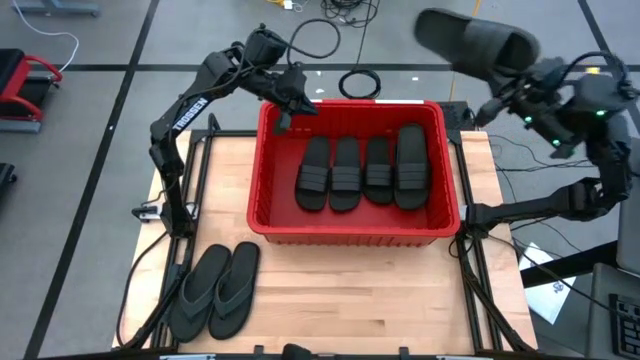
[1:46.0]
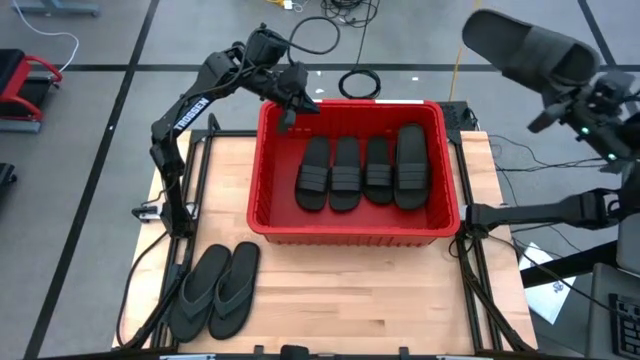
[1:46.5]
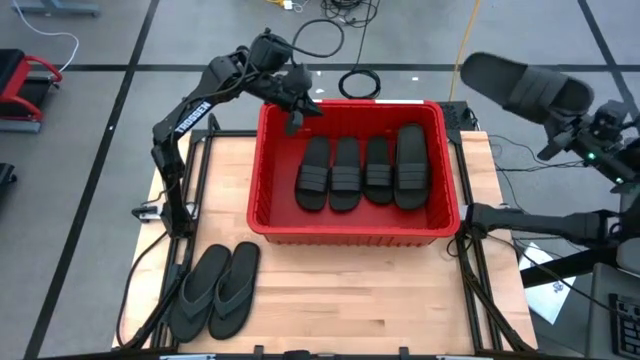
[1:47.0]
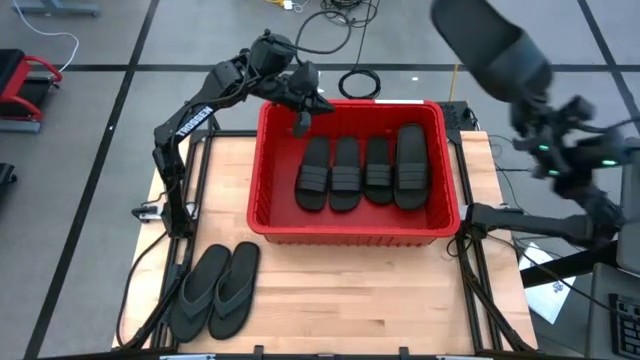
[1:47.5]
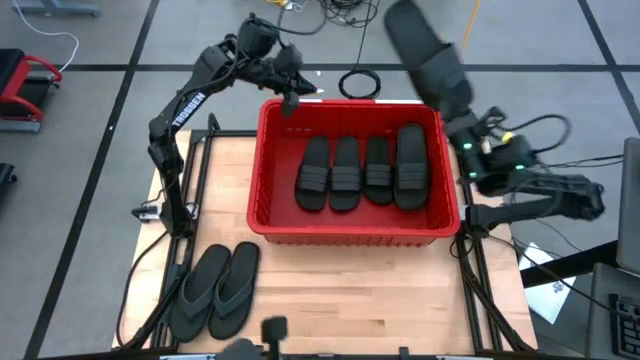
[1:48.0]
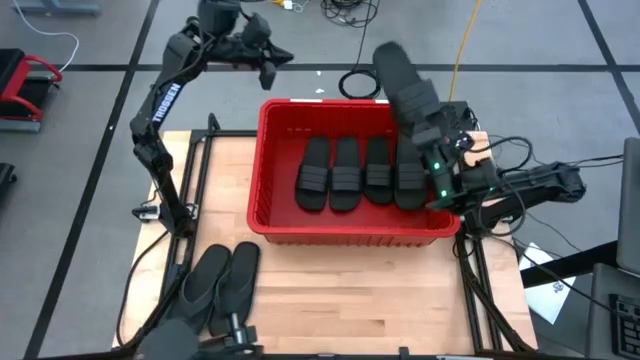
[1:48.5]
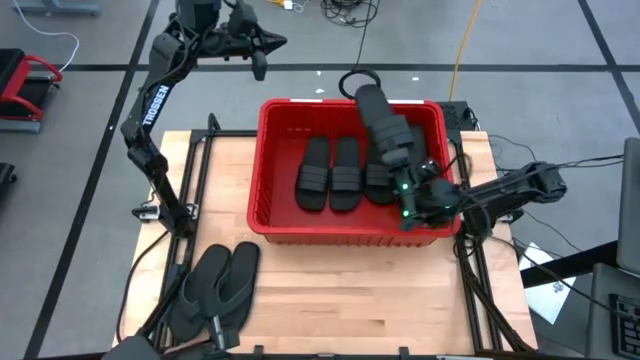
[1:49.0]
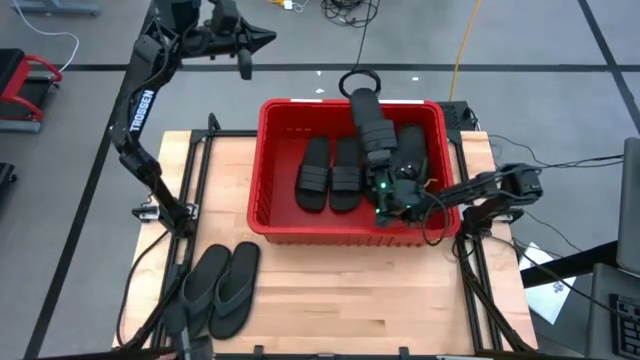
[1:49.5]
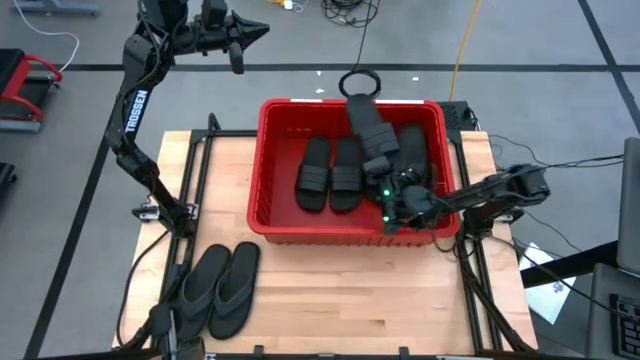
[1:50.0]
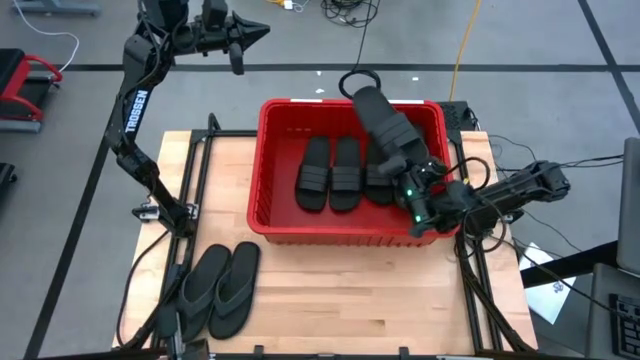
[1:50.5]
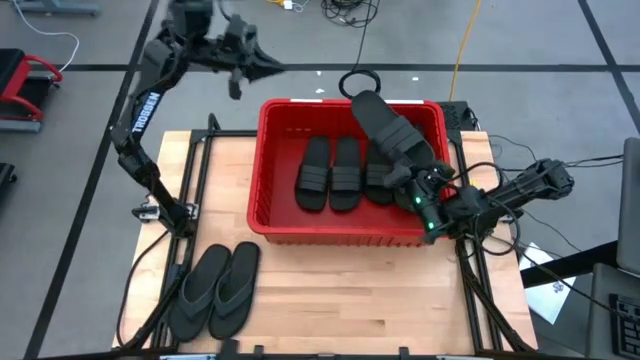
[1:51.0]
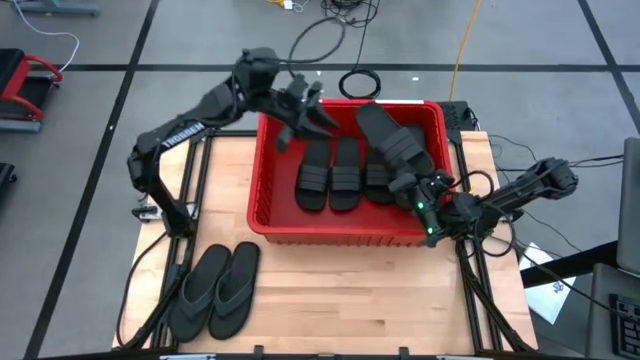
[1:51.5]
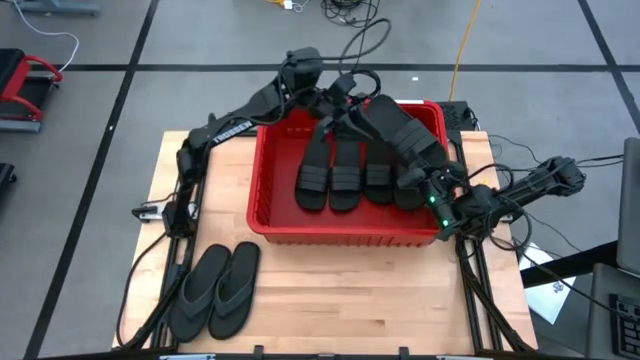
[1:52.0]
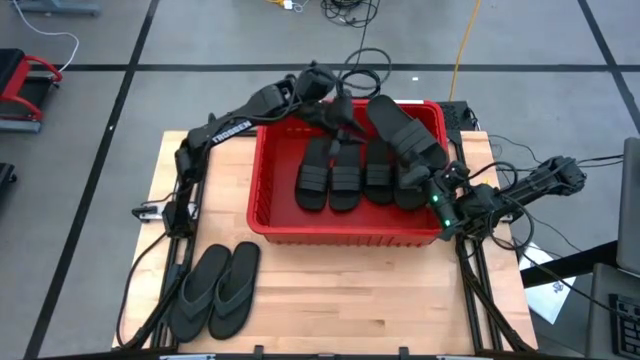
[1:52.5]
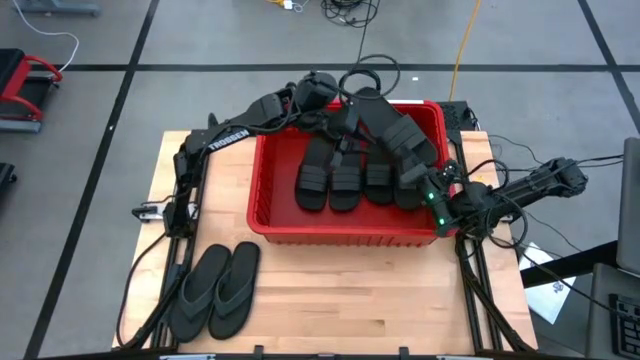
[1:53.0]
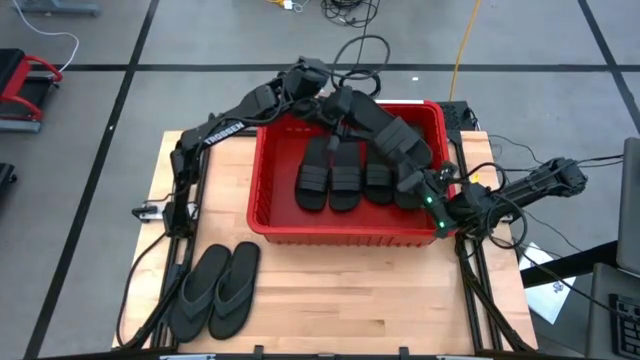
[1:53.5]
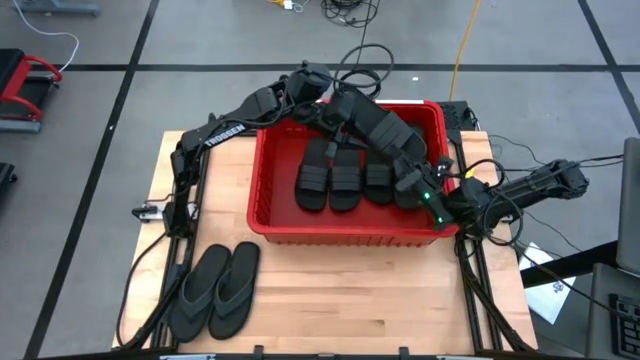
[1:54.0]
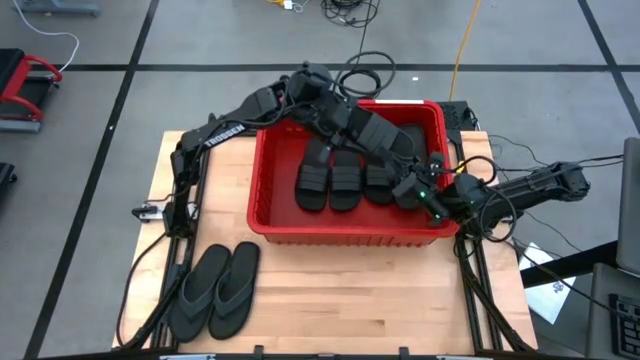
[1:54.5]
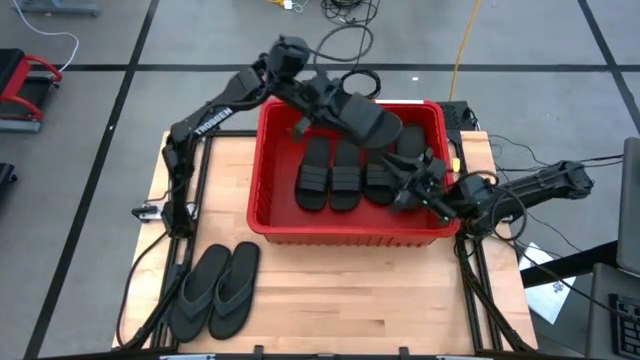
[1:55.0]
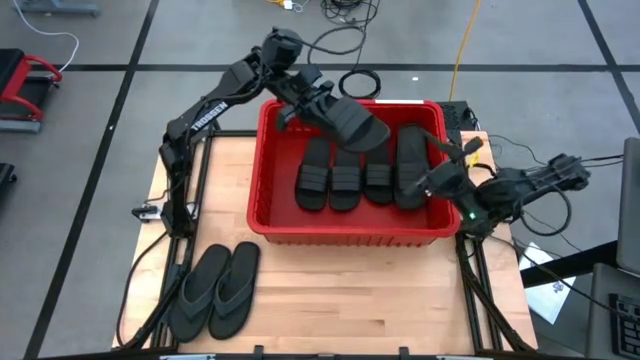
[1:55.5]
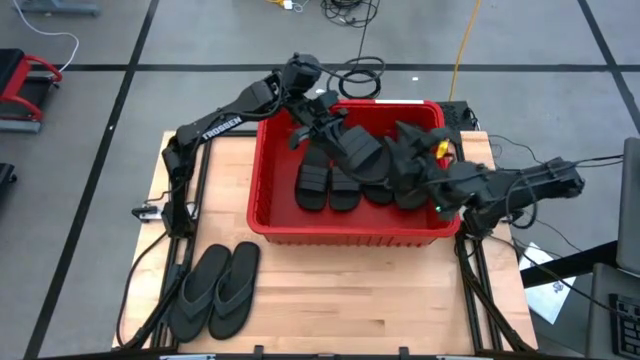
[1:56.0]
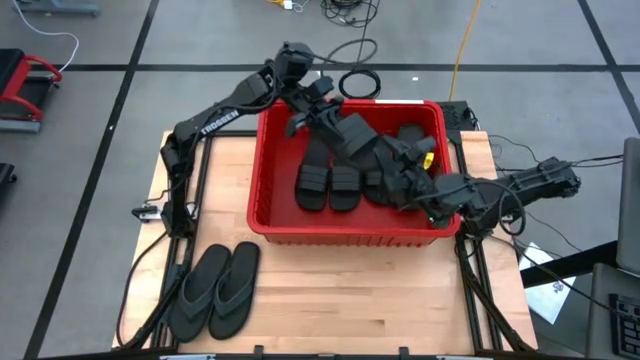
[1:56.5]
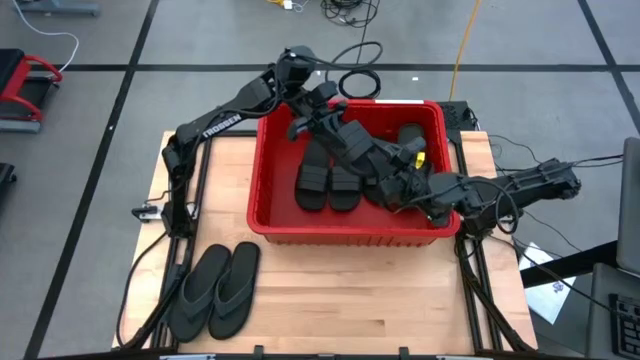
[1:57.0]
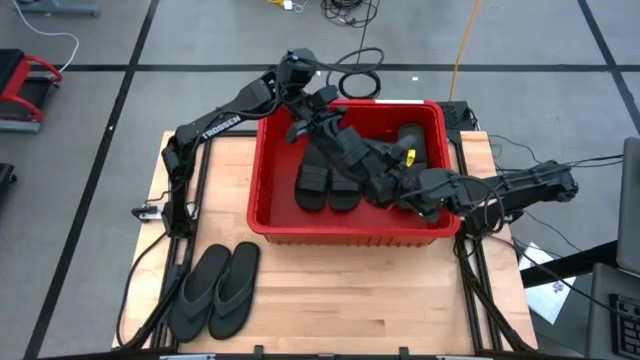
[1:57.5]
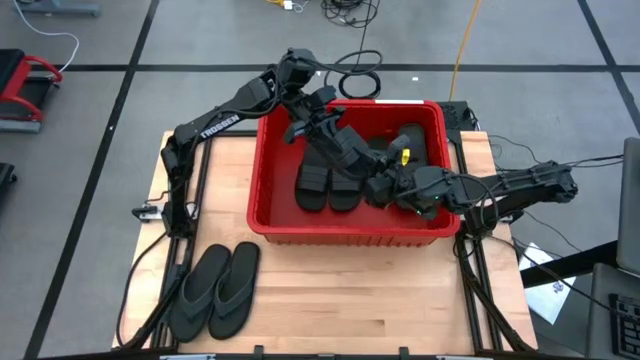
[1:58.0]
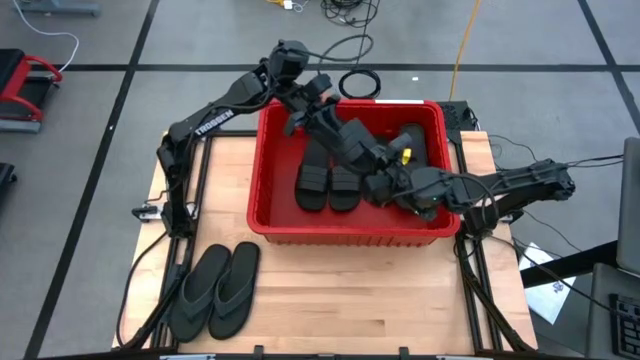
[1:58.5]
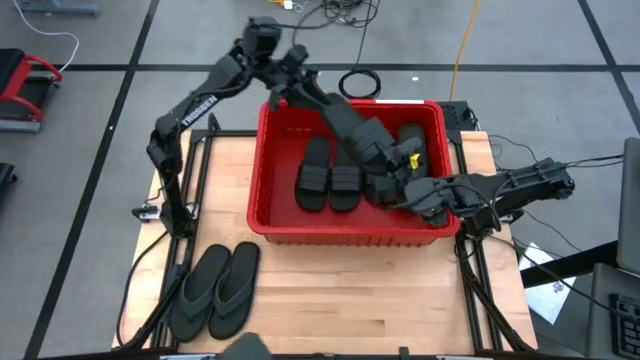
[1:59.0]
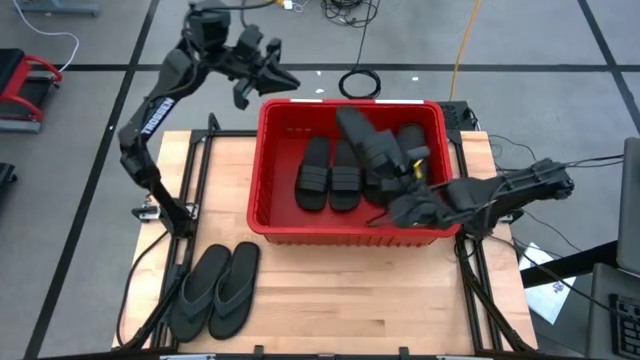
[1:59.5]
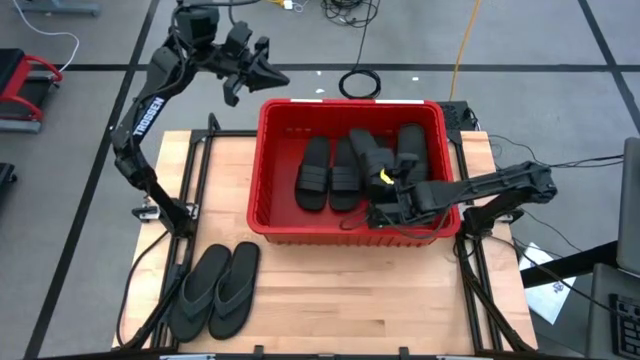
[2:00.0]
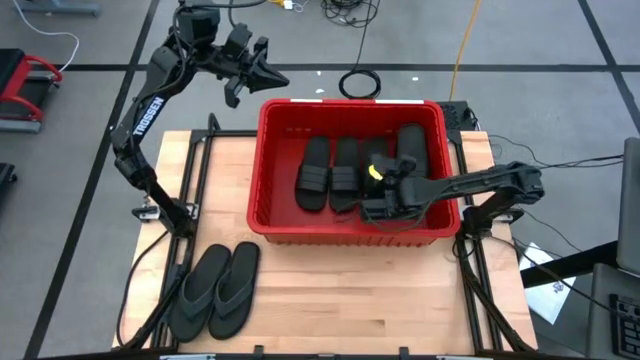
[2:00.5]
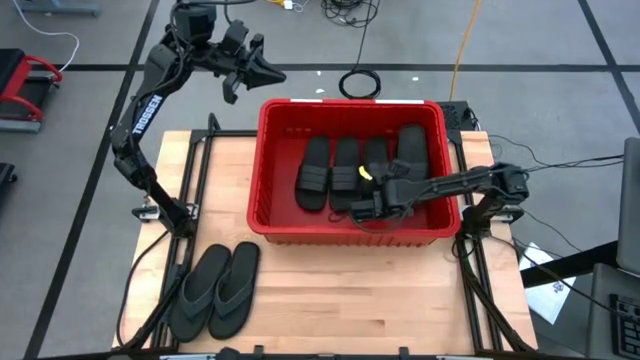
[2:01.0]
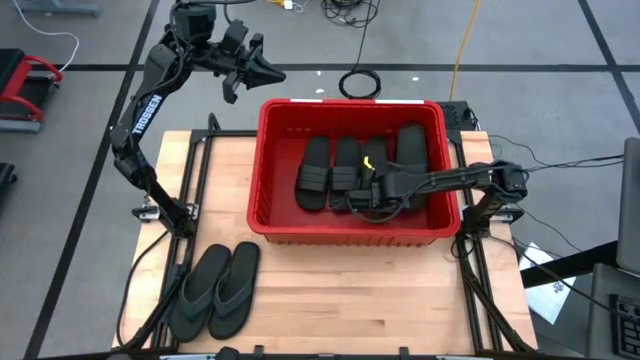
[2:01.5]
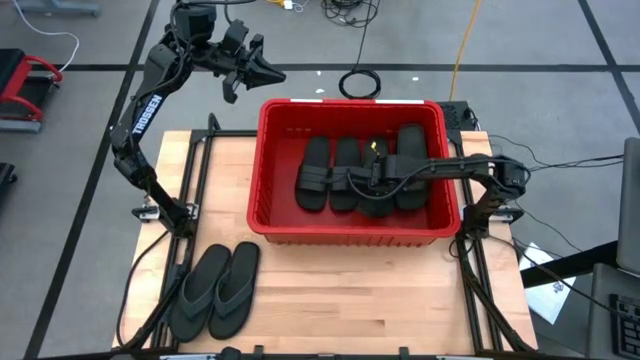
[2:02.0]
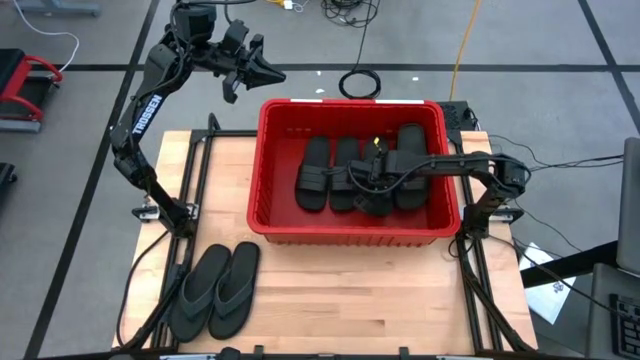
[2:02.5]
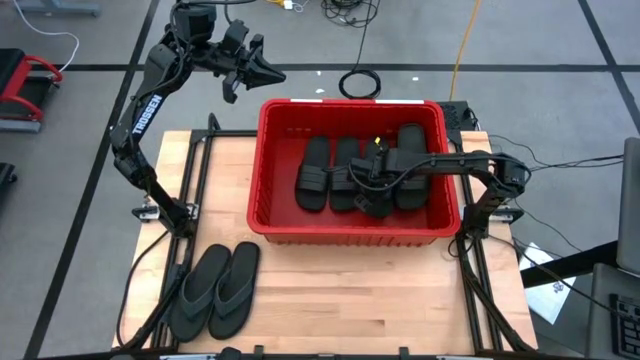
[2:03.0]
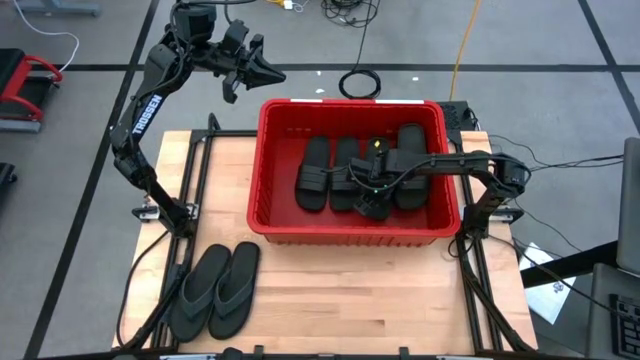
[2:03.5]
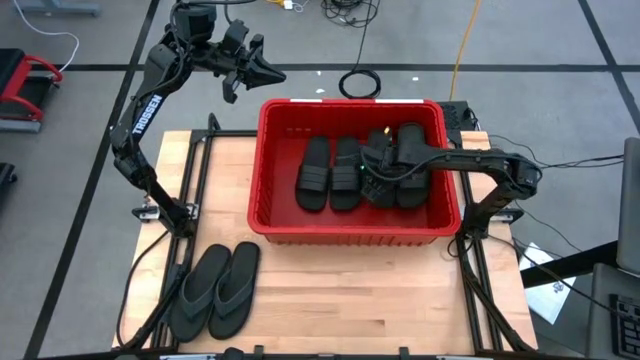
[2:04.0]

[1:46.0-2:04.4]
Task: Pick and place slides into bin
Put the black slide into the red bin

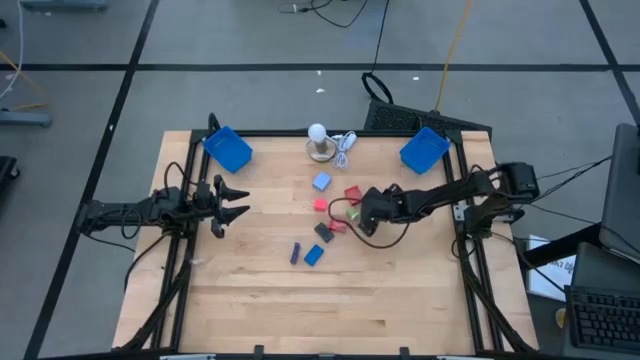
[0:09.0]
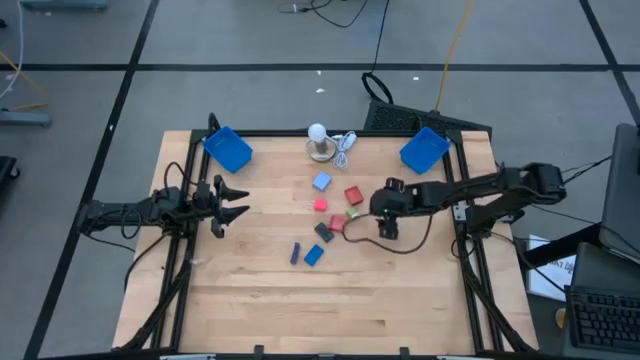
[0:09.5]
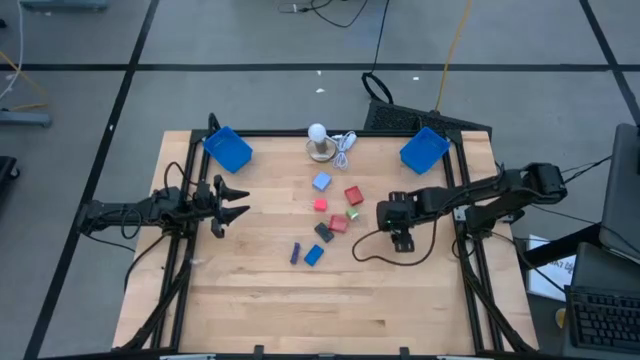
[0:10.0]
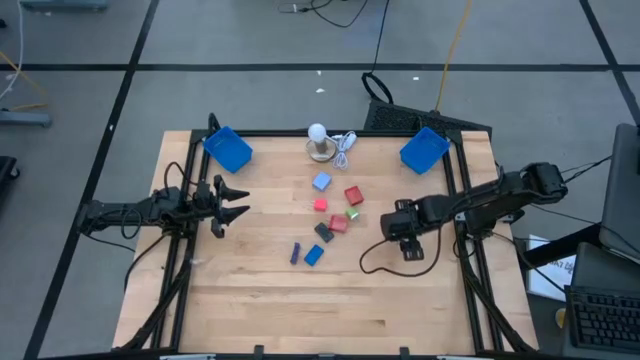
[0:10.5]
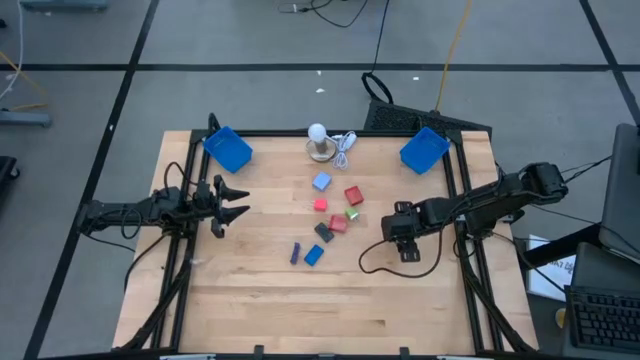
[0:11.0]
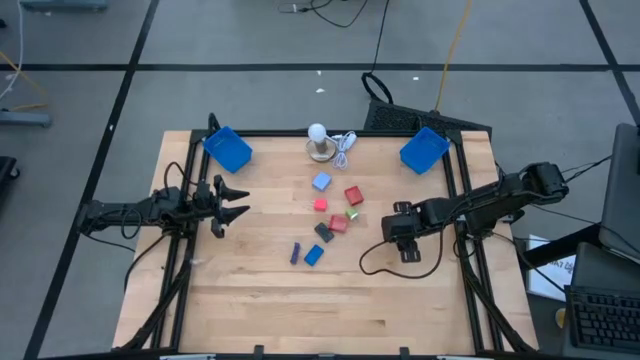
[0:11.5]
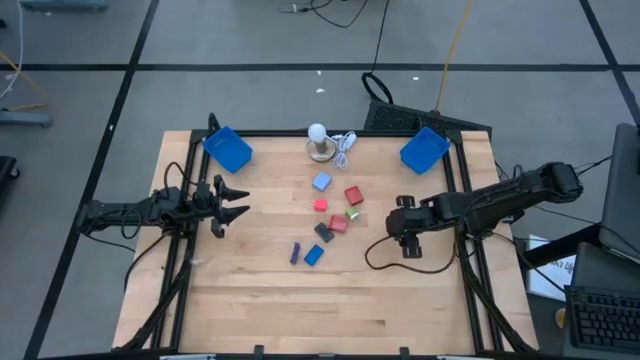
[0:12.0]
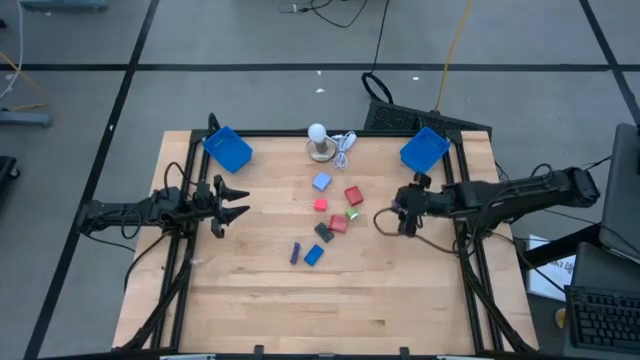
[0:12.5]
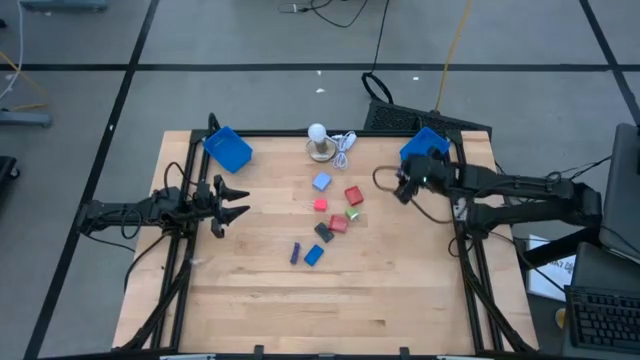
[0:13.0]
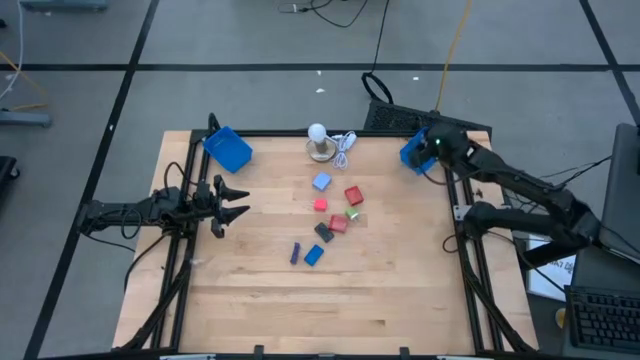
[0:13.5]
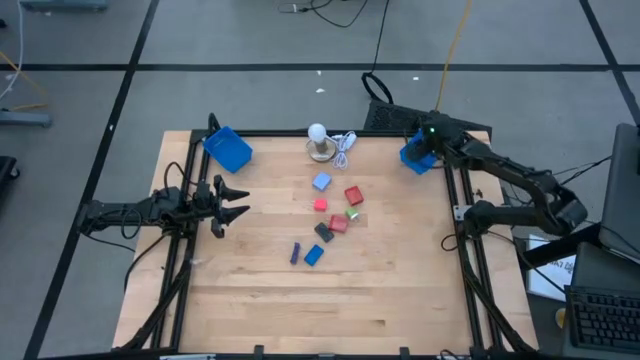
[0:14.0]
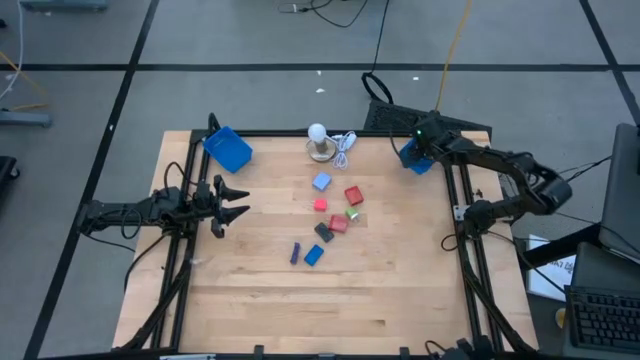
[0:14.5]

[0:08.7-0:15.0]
Task: Pick & Place Office items
Put the violet charger adapter into the right blue bin
